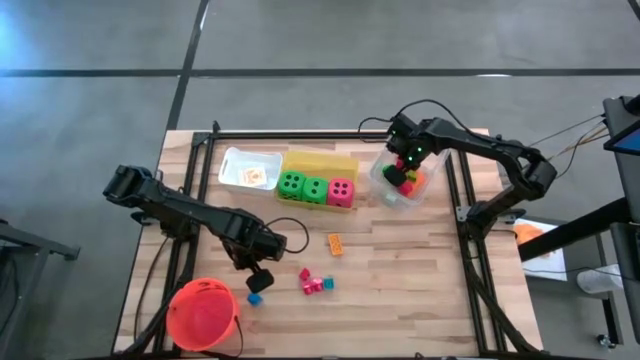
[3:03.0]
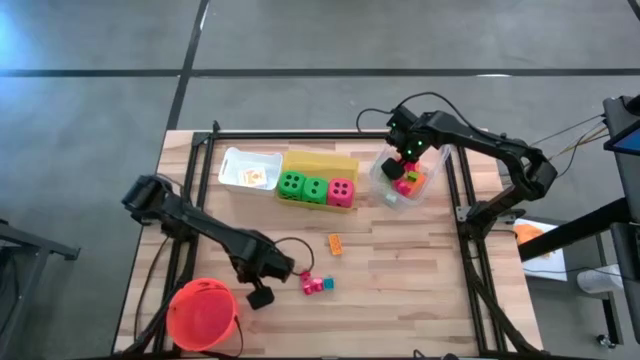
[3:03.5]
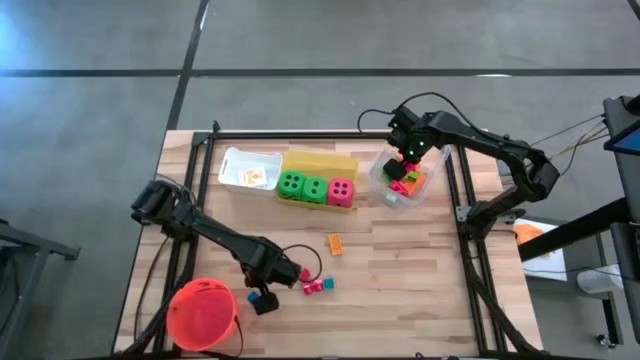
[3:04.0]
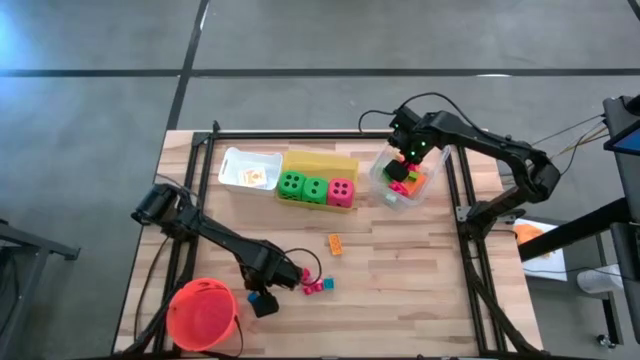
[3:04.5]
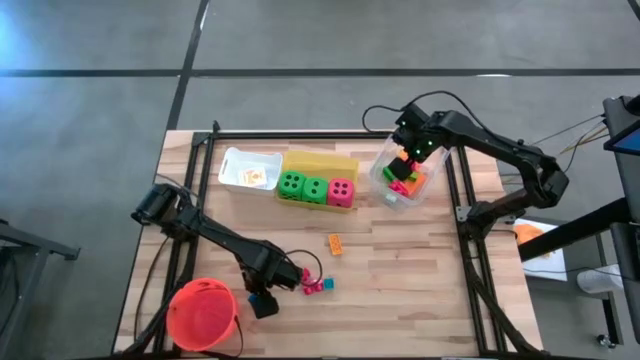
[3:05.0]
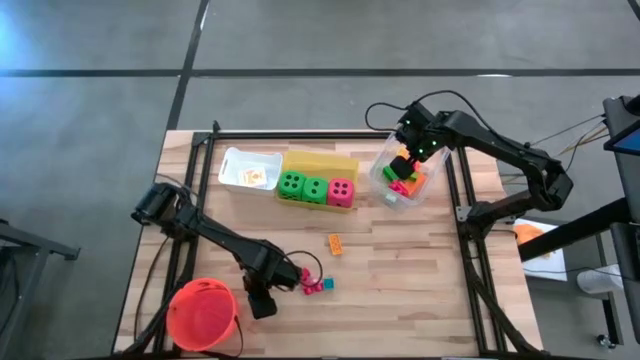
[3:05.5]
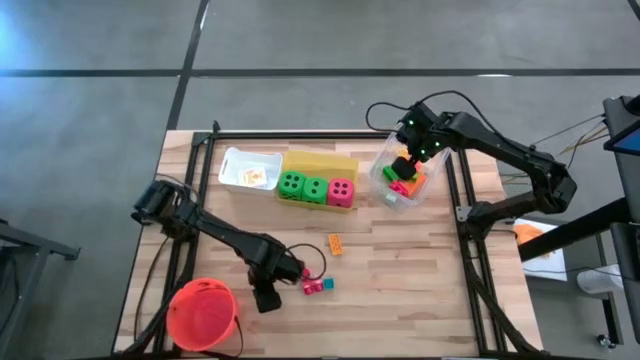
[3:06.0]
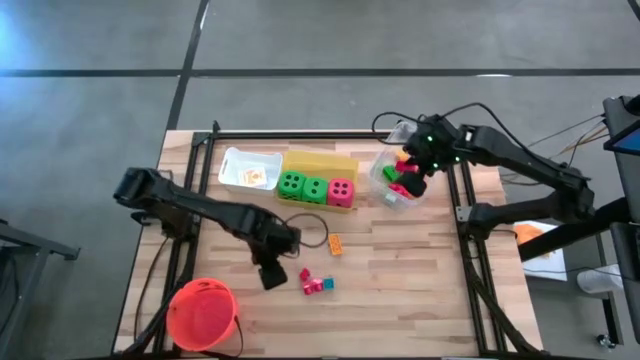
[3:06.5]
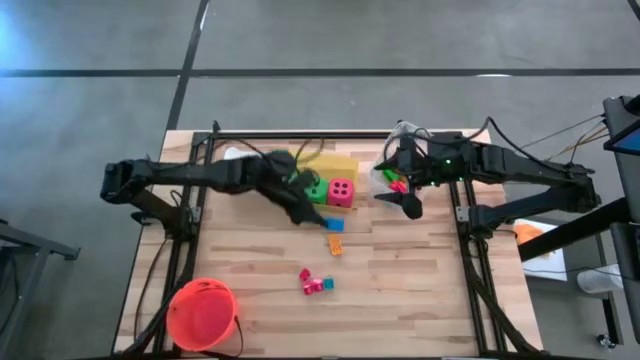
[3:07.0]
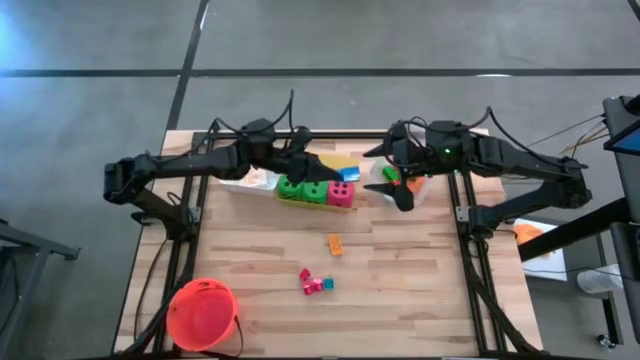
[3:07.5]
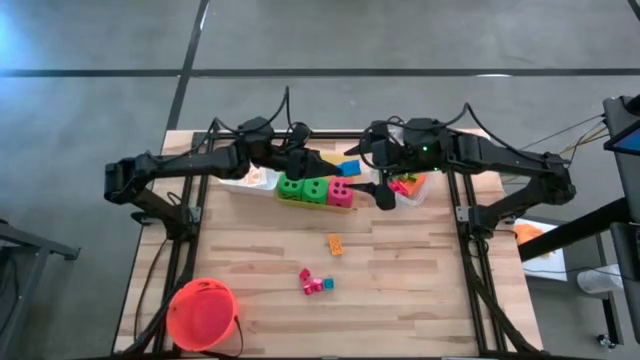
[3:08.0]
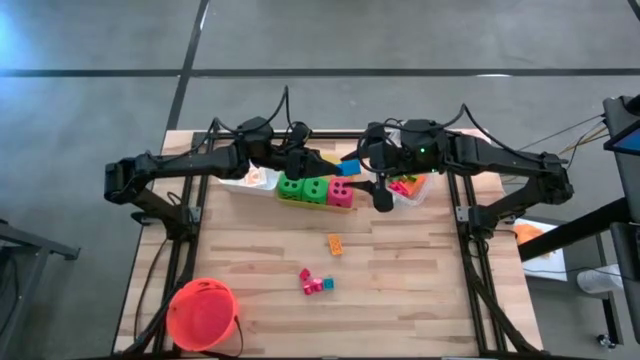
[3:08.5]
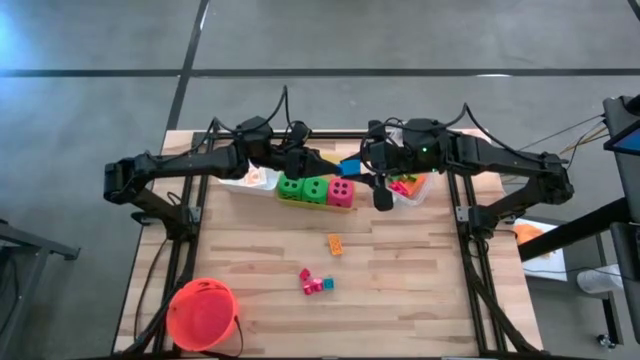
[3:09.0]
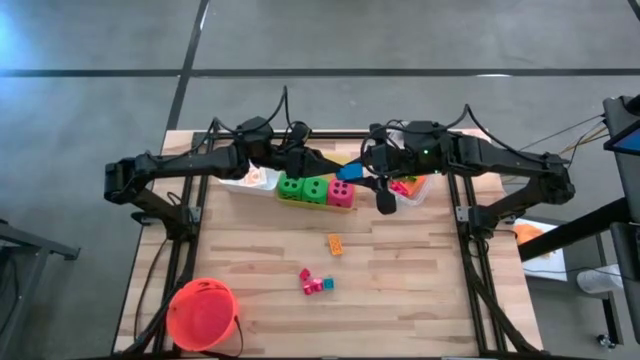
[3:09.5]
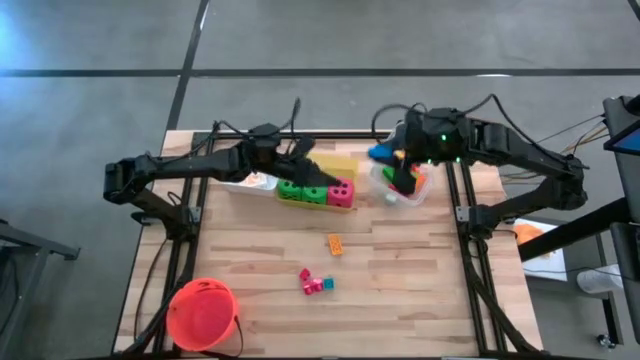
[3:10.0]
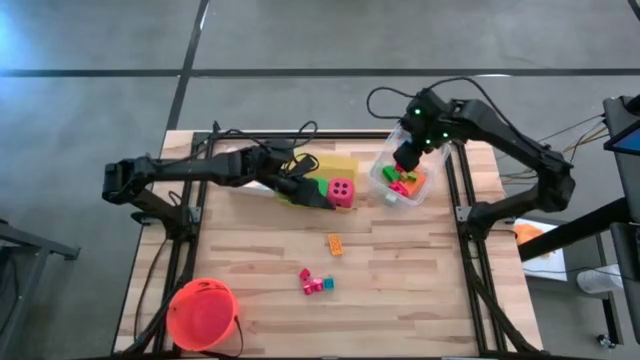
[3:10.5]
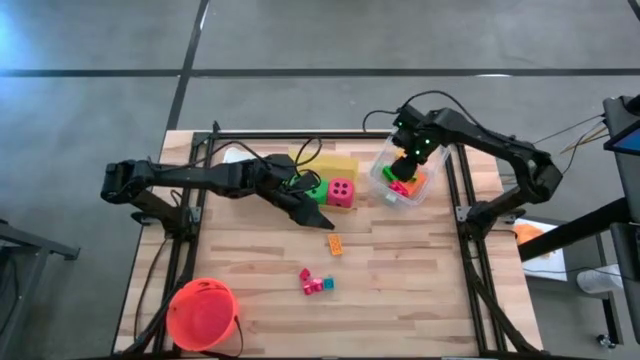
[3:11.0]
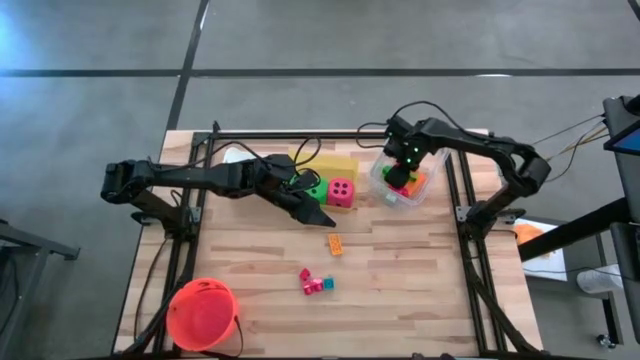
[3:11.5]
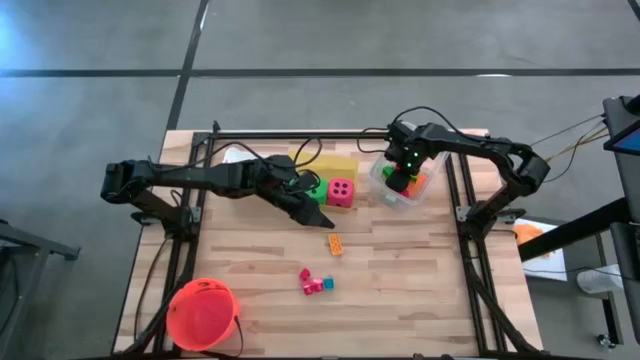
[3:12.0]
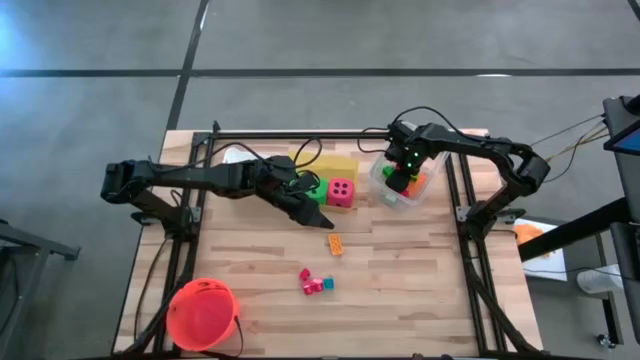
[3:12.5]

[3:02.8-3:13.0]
Task: Pick & Place Toys
Put the dark blue game piece into the transparent bin

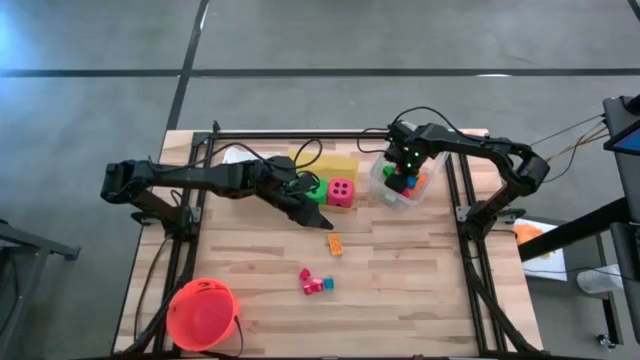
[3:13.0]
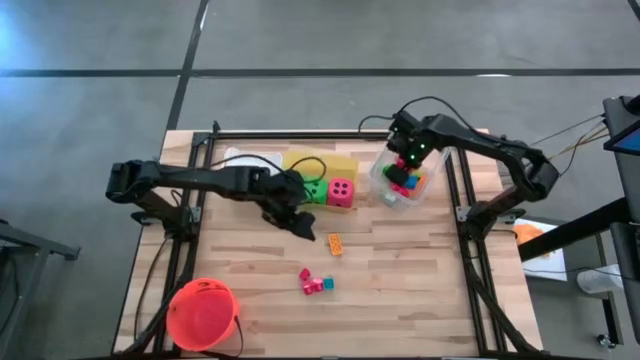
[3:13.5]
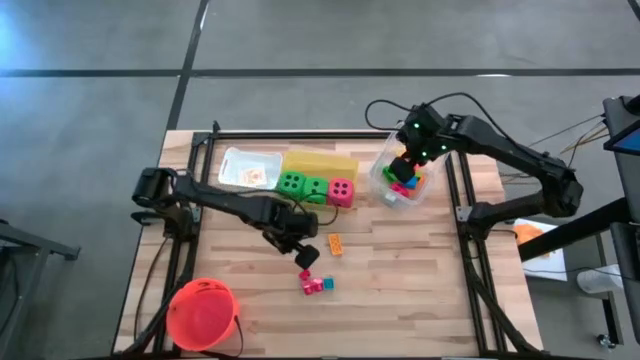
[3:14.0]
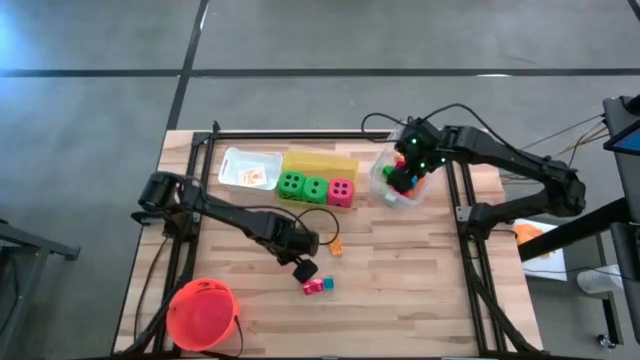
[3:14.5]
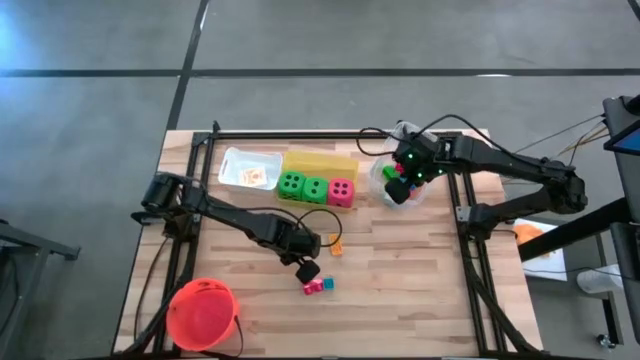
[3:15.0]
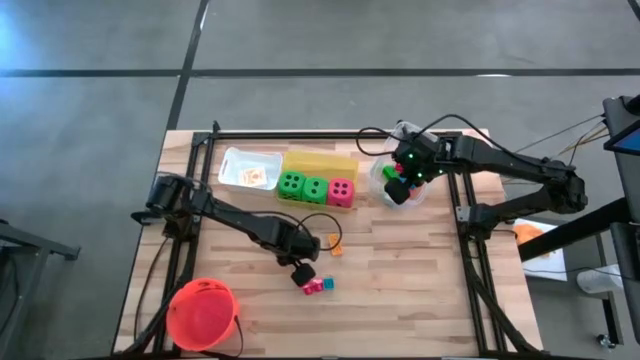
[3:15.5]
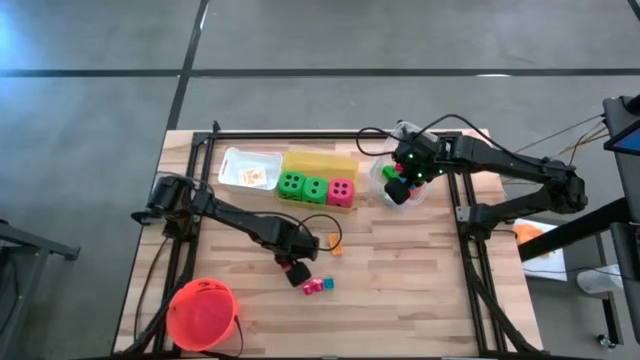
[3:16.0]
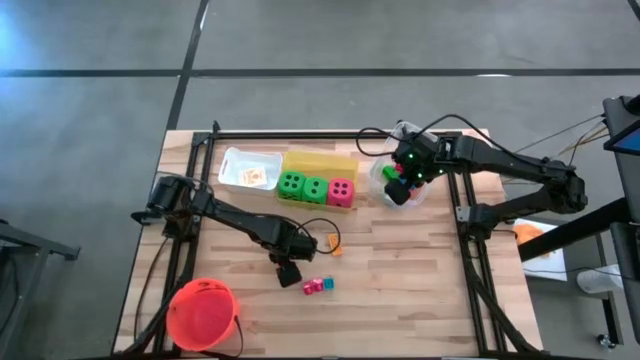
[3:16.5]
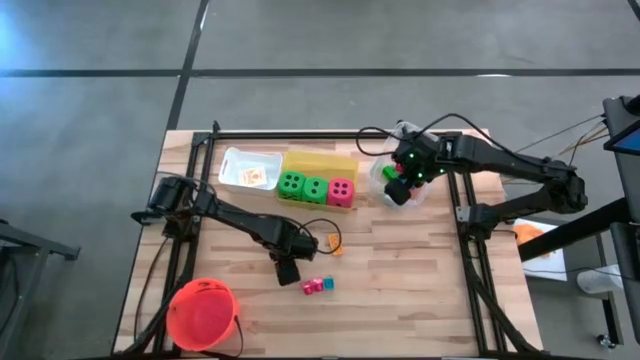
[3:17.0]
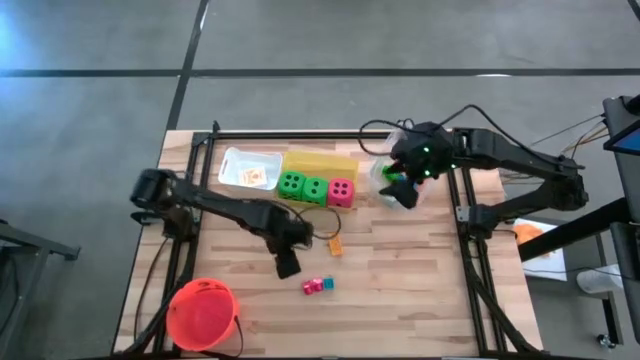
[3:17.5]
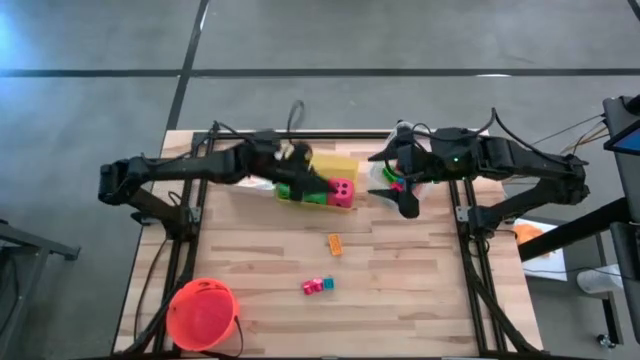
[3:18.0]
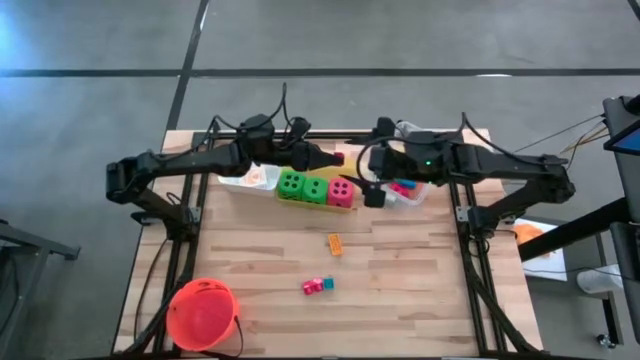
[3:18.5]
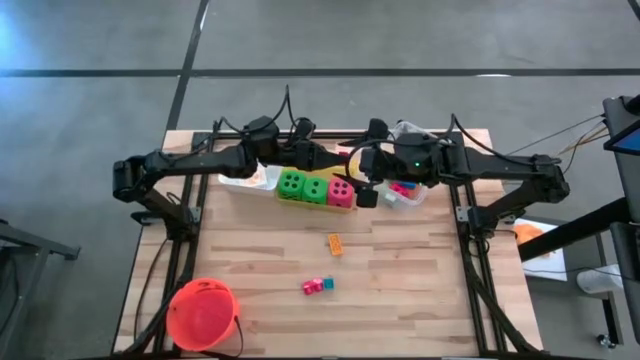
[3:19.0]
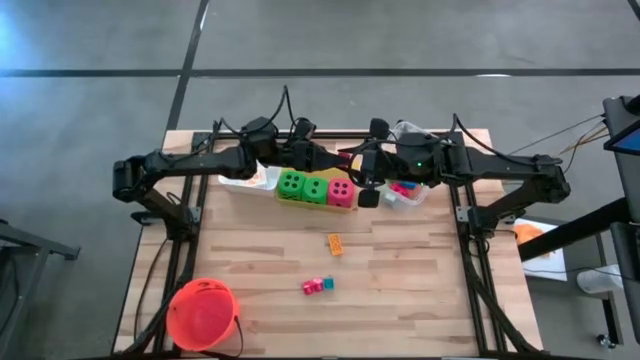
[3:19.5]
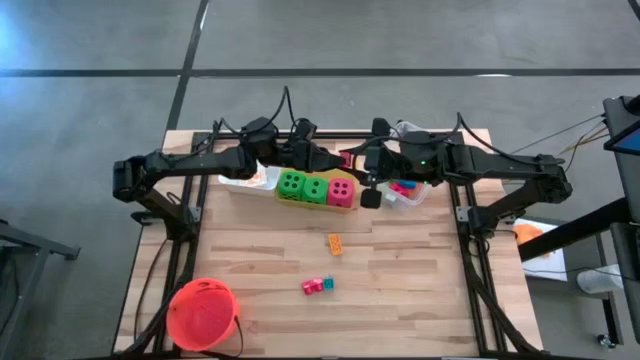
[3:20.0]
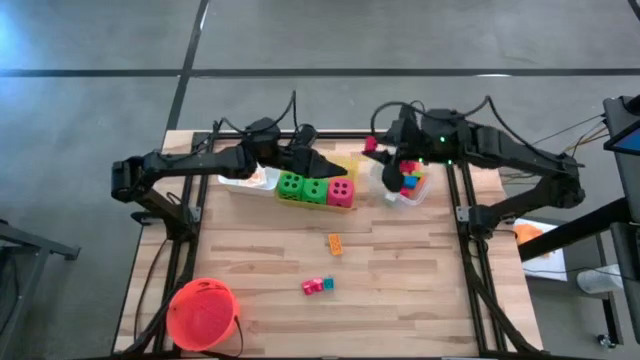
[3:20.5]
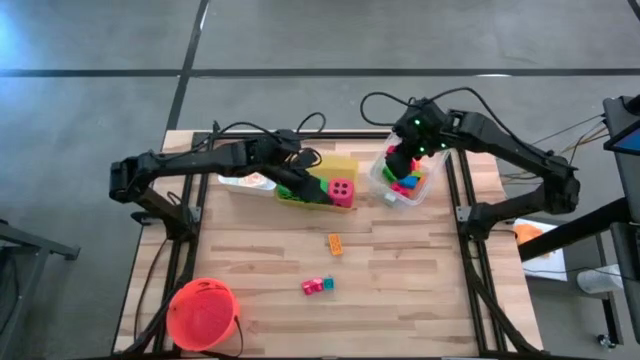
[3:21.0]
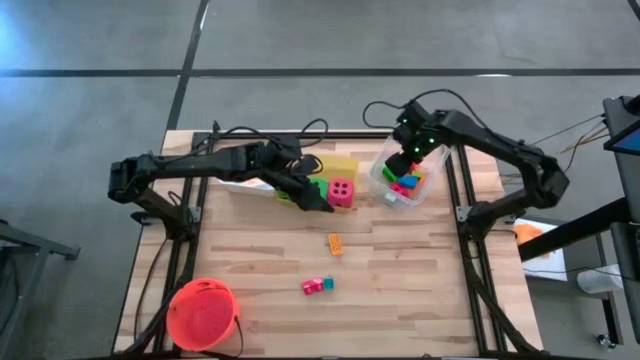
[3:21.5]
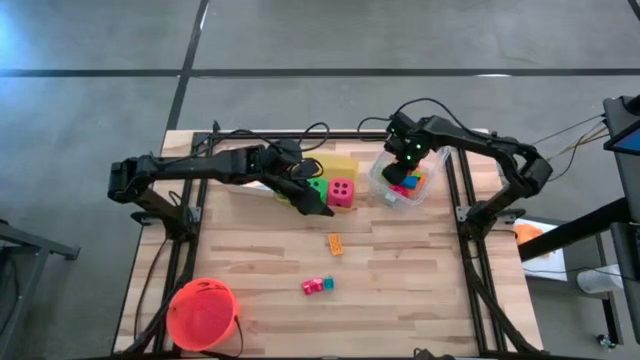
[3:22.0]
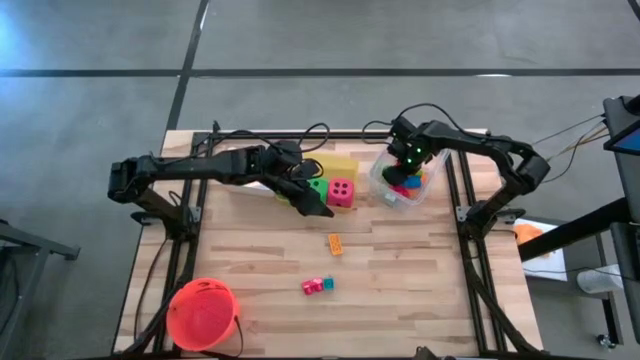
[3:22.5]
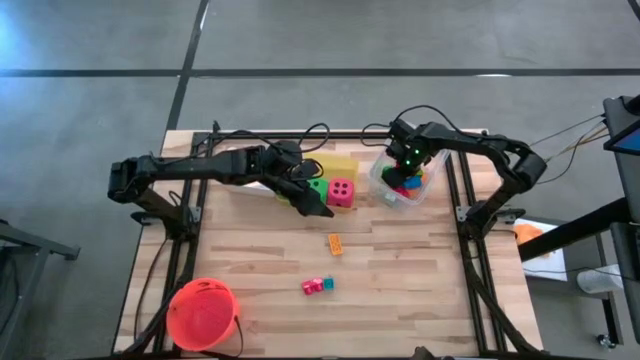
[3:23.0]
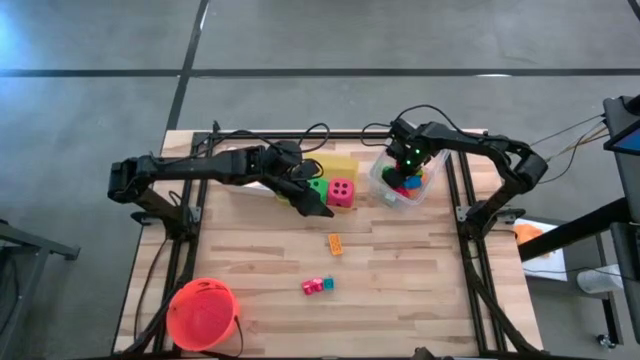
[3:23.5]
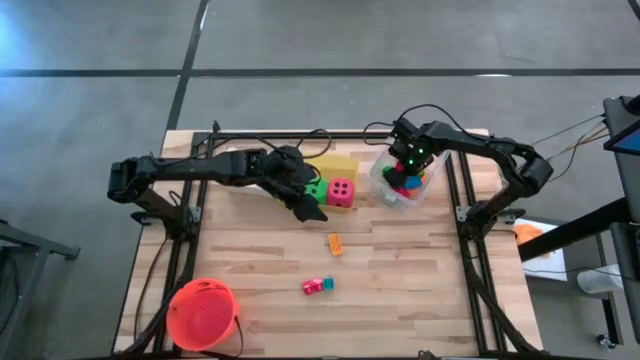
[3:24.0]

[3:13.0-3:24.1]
Put the red game piece into the transparent bin
